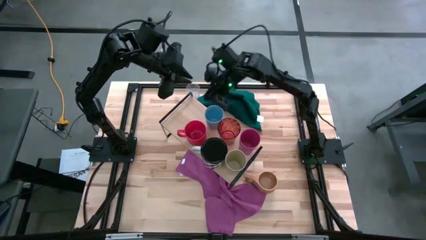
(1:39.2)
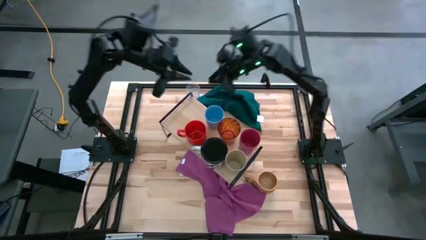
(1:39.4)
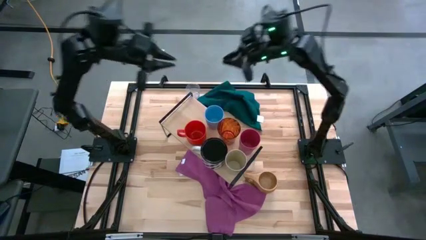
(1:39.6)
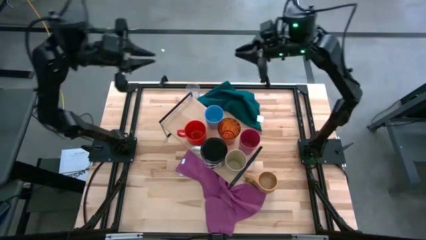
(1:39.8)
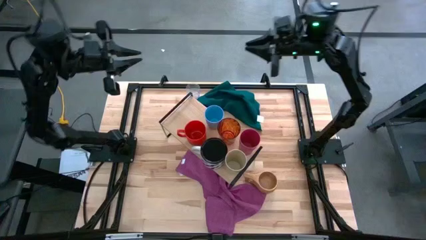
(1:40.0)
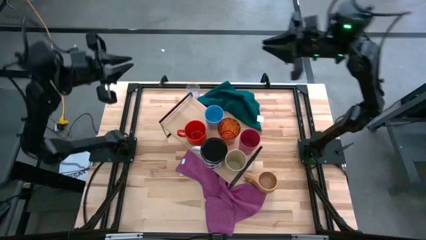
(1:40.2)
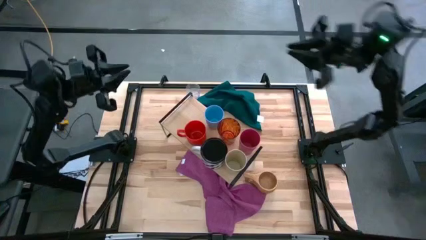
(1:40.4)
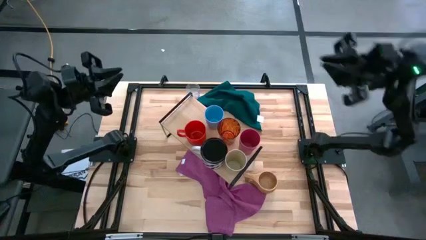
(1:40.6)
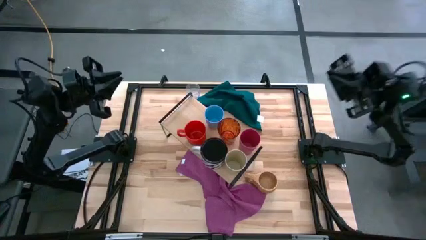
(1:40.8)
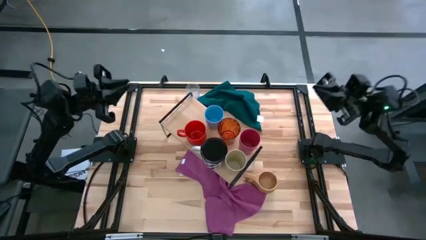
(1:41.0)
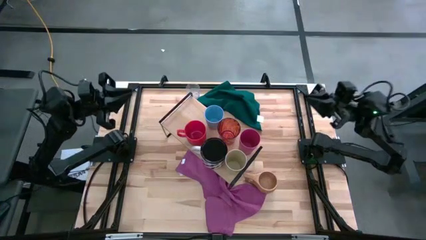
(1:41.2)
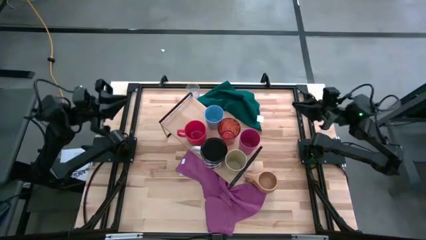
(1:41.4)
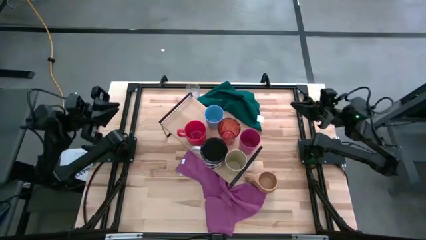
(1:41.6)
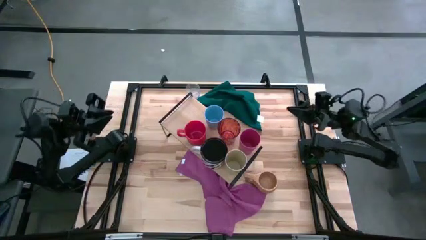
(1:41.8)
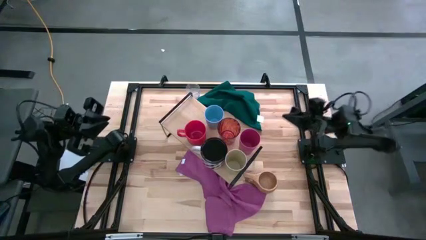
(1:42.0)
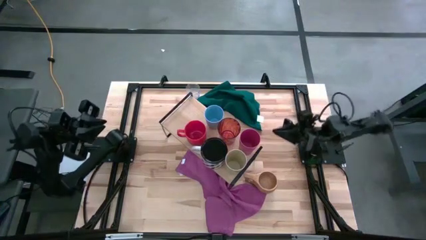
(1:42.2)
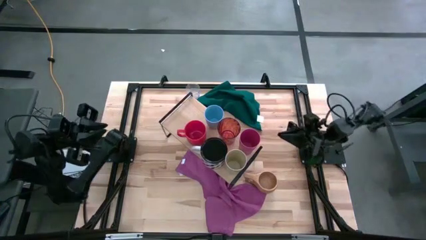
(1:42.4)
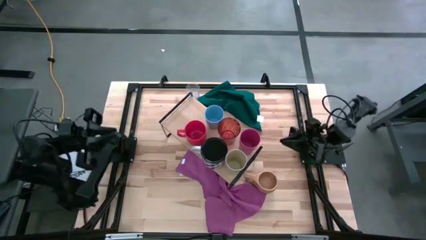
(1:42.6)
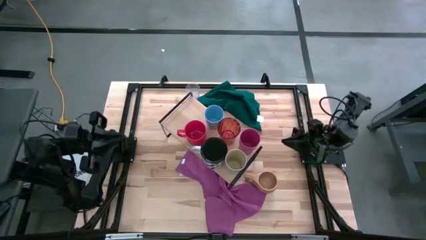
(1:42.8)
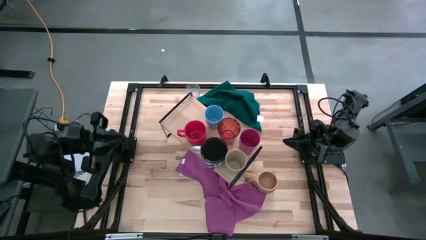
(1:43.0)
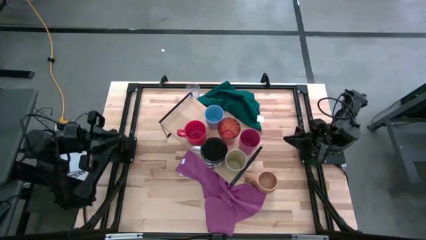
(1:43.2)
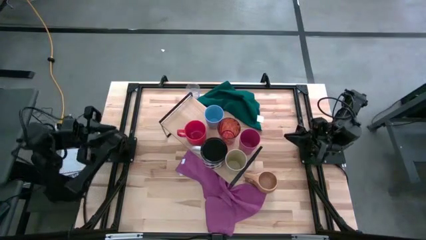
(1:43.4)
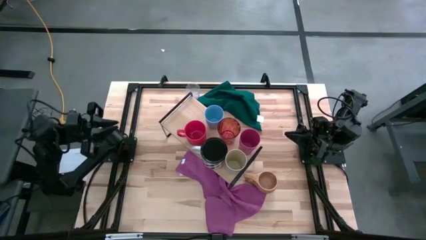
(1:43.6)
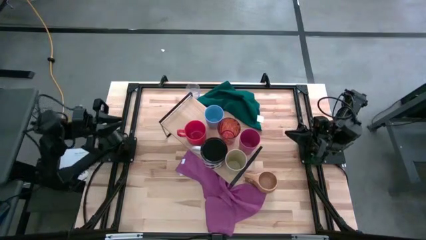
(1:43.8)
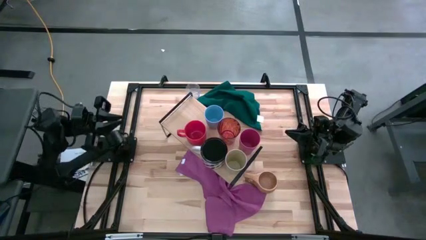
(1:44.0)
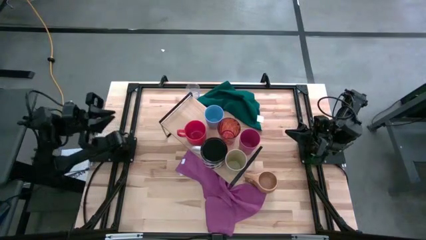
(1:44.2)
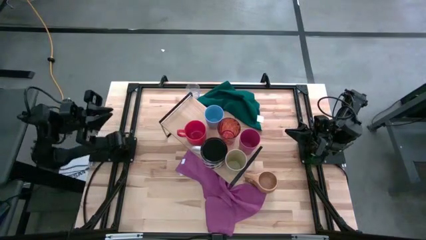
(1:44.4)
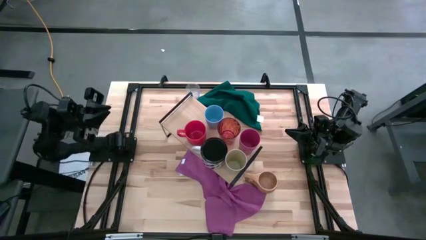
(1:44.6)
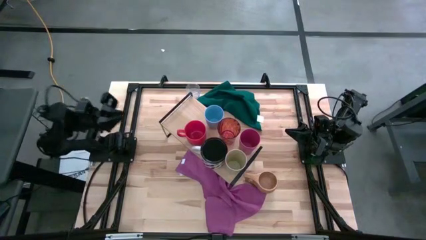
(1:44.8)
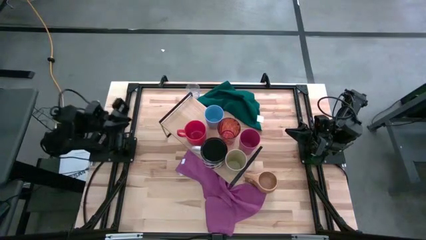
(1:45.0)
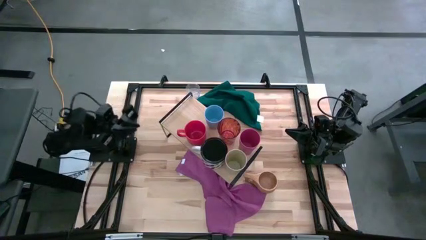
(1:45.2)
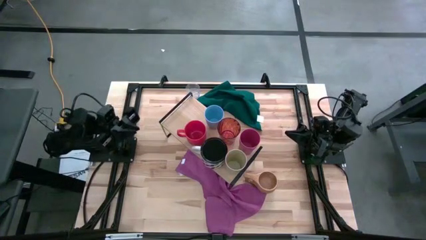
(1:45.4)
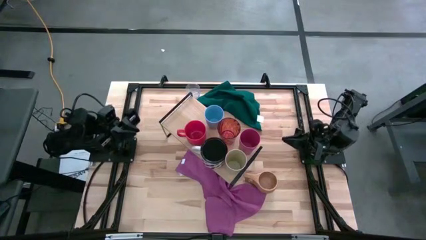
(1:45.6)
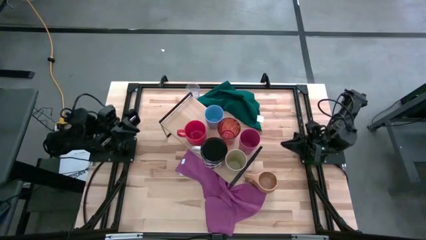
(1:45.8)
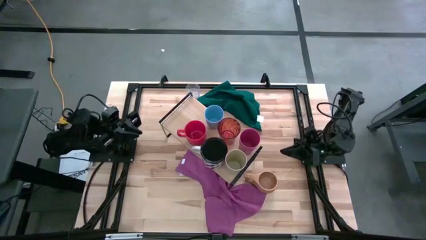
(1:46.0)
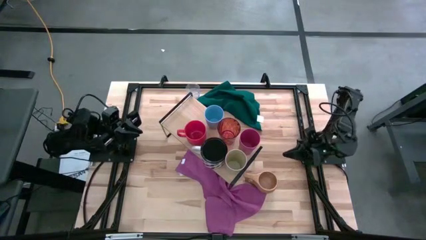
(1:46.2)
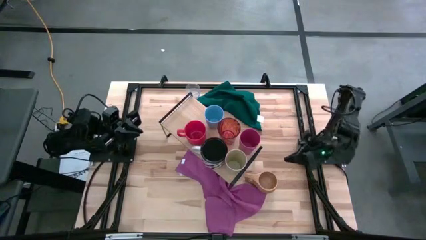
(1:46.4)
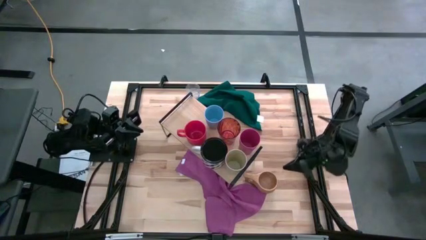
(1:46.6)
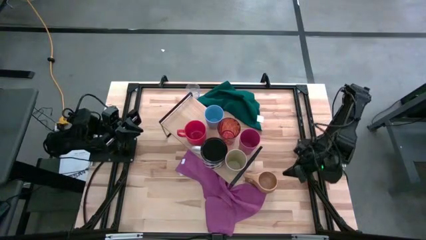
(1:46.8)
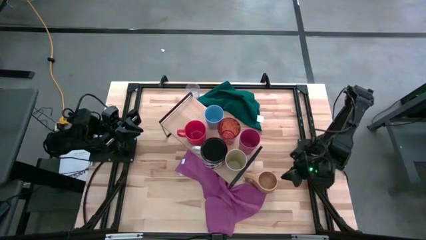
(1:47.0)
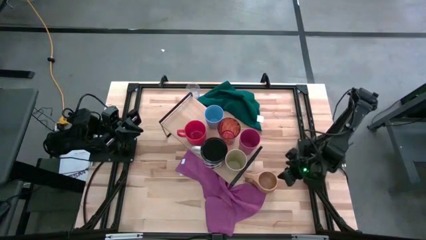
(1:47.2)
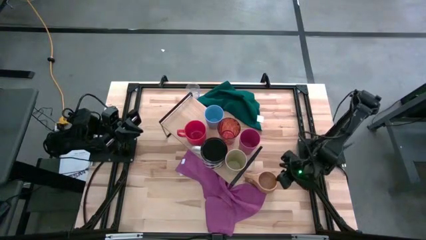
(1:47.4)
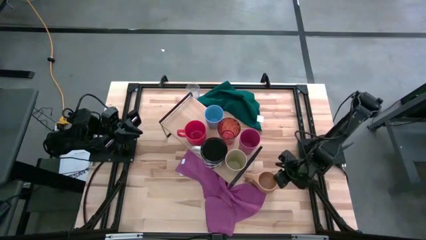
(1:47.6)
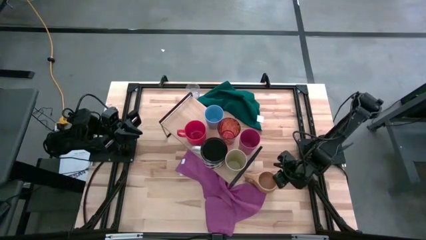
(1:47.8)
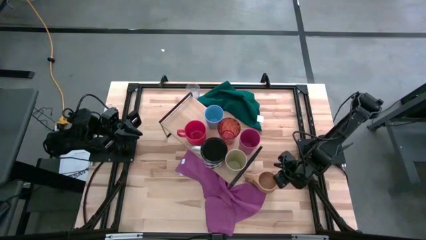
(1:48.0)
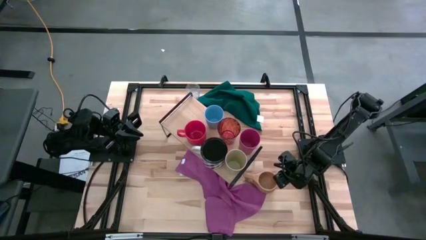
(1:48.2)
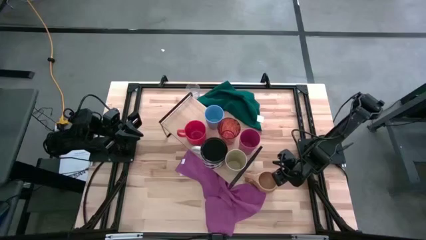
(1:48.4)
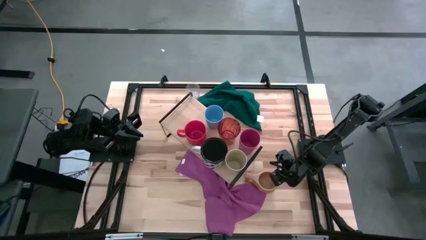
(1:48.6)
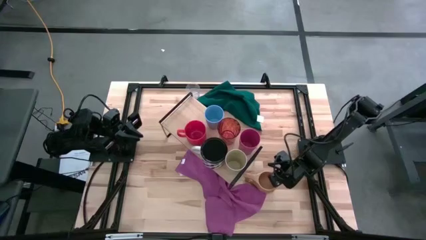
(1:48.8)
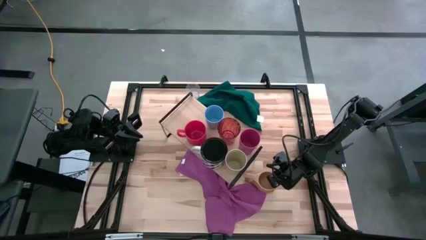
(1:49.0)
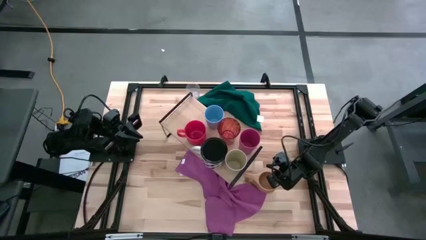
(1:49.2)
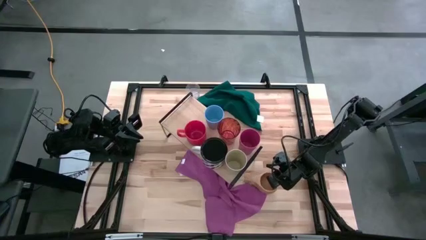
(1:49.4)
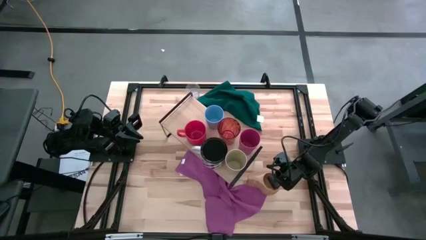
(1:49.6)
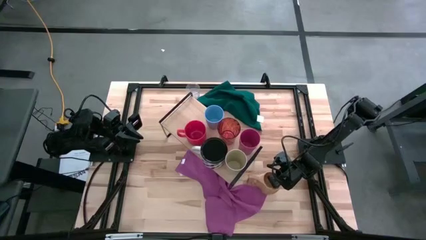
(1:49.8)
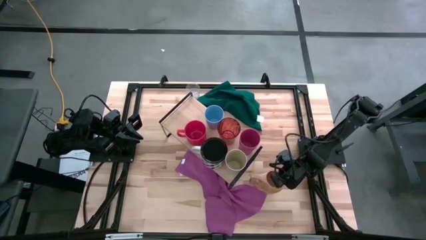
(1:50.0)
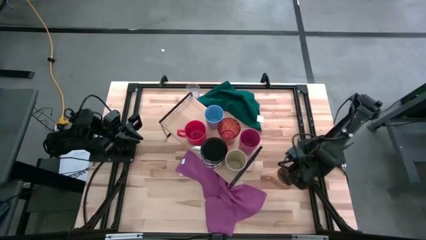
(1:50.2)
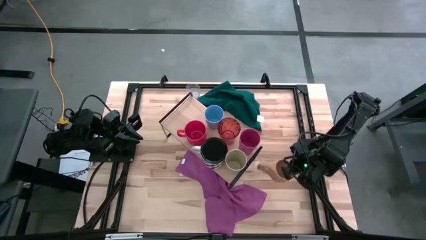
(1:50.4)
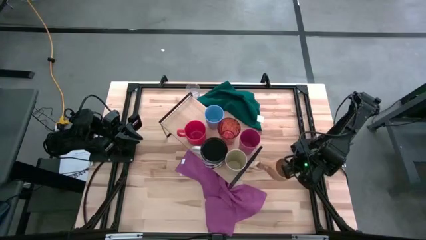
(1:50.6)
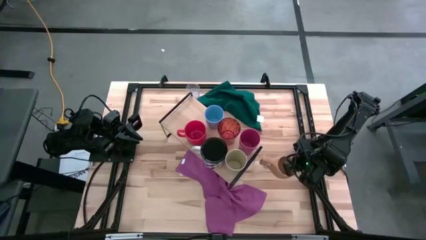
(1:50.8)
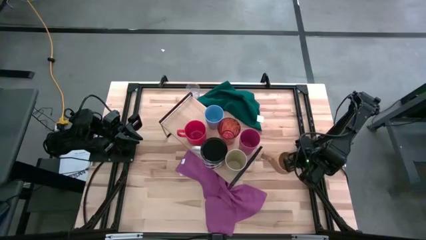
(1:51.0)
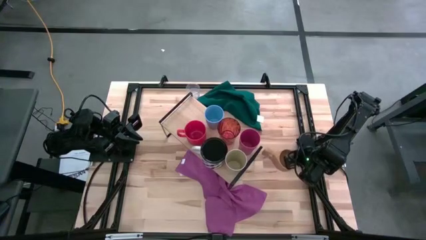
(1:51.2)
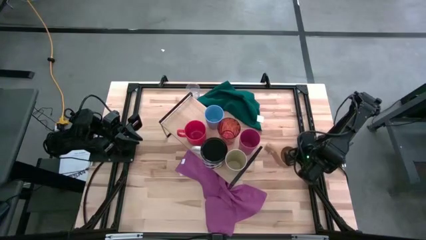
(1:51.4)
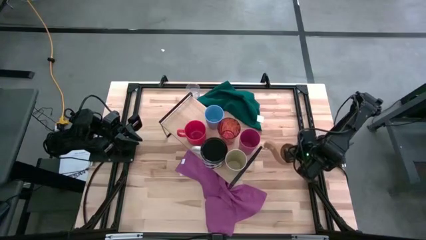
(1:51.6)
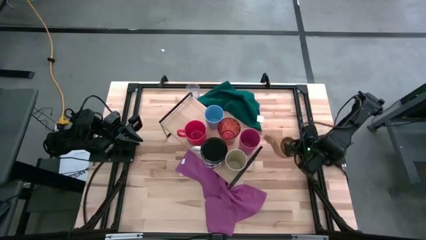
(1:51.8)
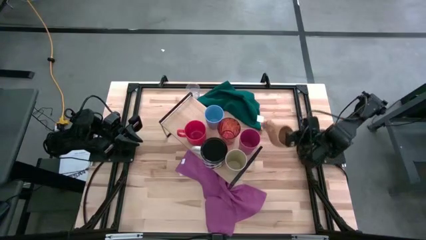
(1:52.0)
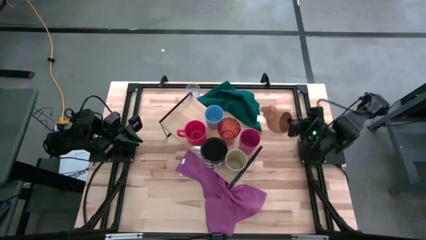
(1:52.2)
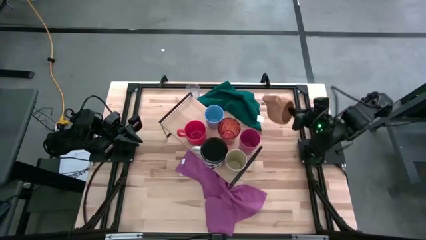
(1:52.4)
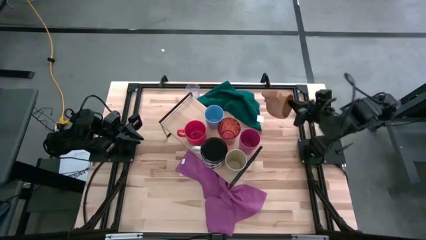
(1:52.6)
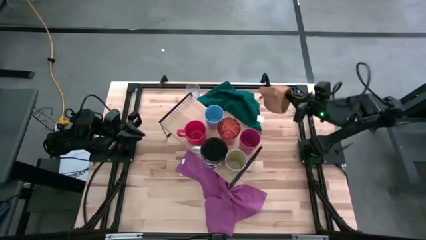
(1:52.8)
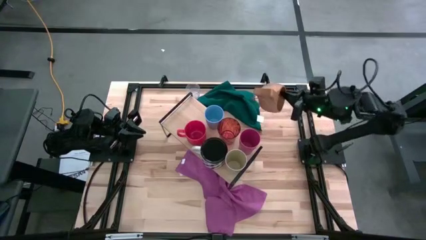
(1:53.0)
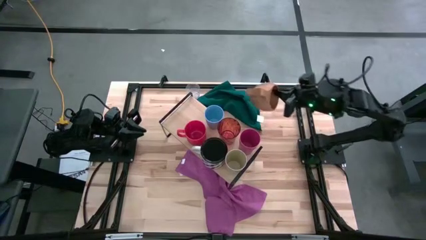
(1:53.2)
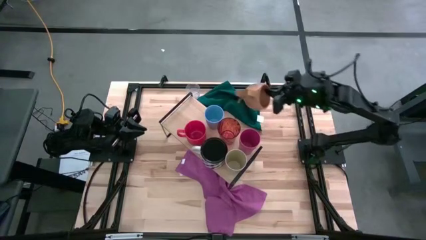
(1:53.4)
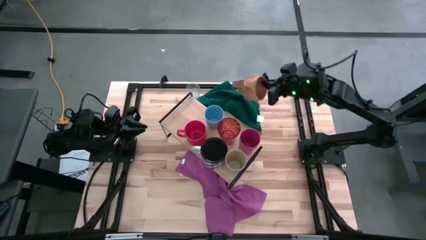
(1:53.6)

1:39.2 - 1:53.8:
Task: Stack small to large cups/mugs on shelf
Put the brown mug on the shelf

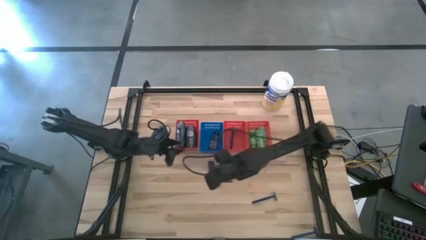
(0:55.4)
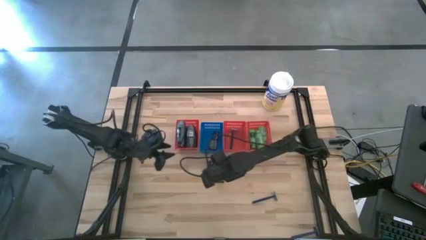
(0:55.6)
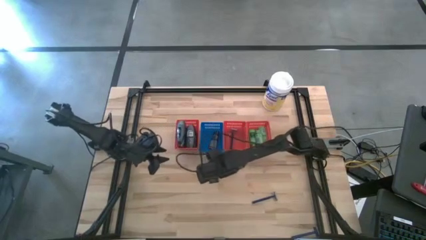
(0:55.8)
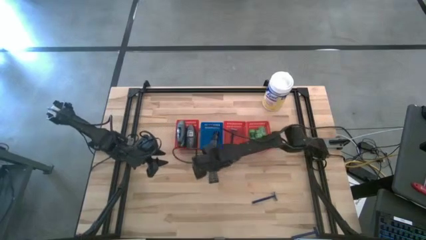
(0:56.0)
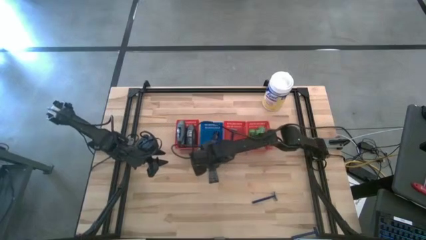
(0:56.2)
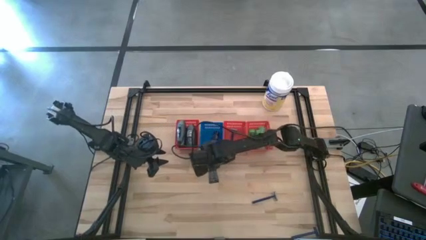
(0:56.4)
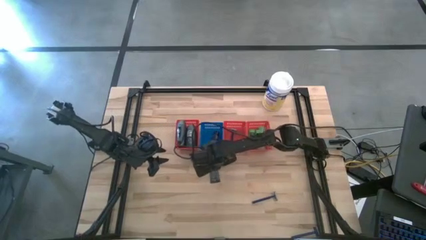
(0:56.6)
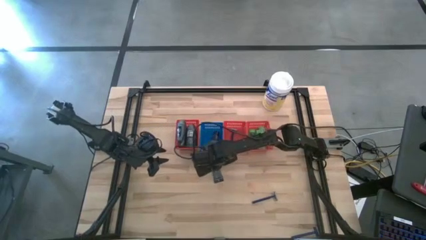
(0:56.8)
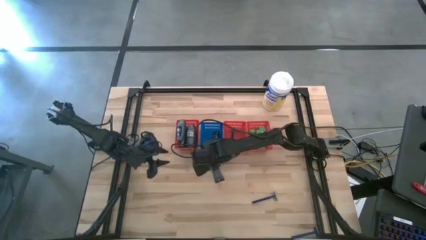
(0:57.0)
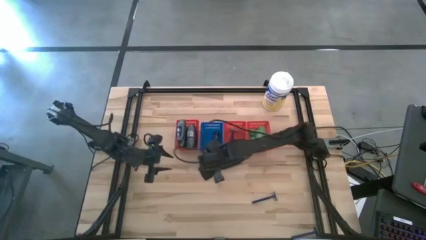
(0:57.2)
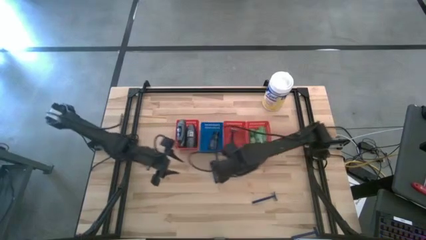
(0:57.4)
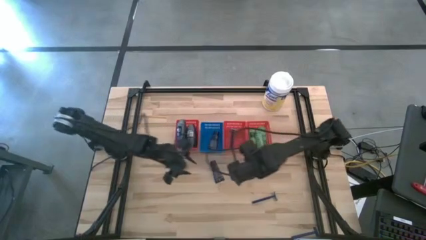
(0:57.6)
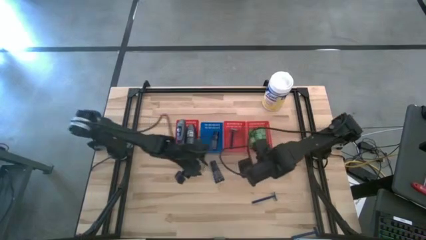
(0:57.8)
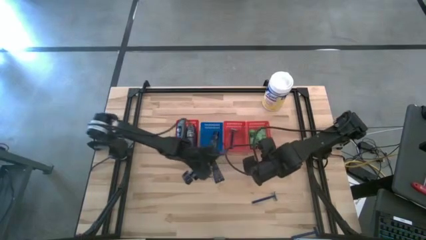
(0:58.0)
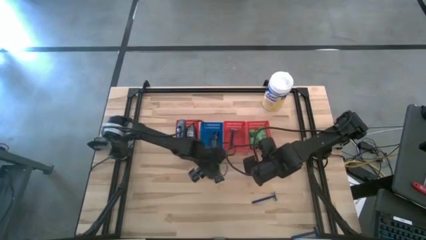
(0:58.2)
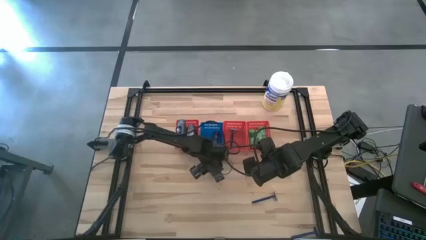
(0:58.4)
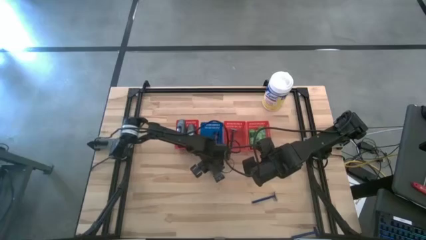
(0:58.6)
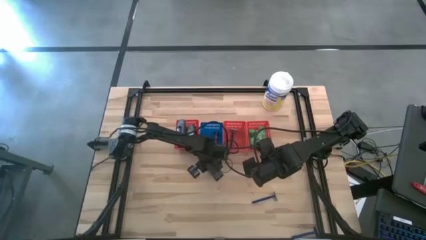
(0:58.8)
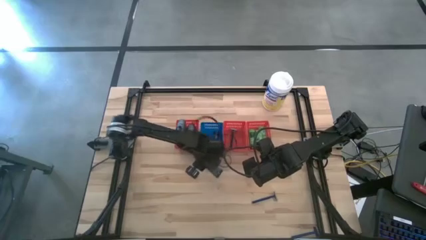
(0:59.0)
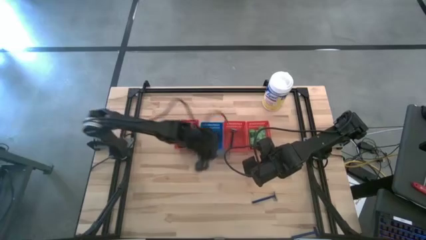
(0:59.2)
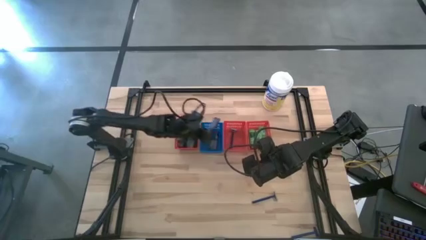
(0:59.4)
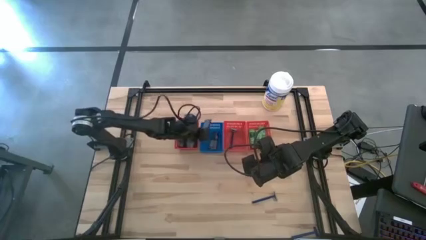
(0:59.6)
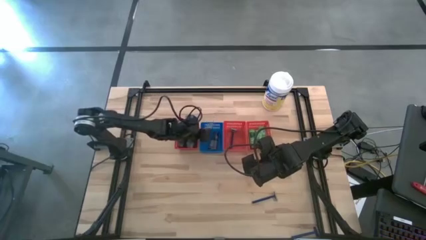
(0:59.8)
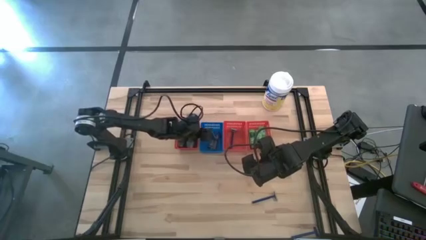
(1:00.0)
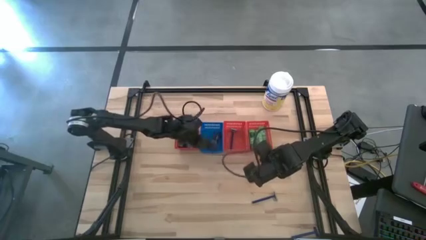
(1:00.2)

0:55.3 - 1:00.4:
Task: Pick & Place Travel size toiletries
Put the blue shaving cream into the blue basket
